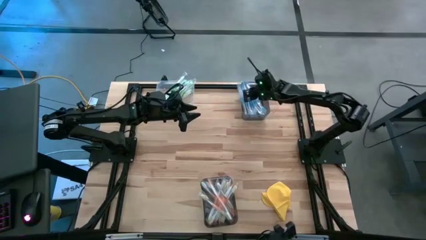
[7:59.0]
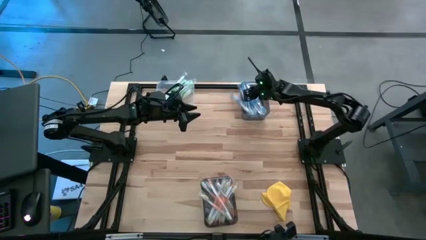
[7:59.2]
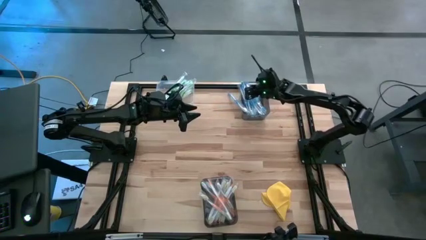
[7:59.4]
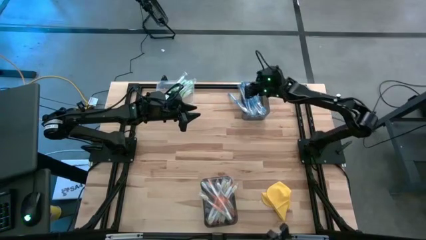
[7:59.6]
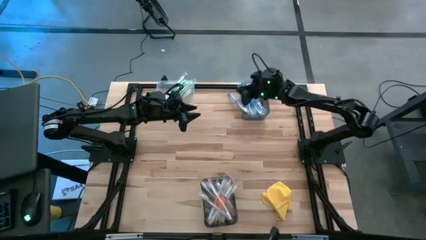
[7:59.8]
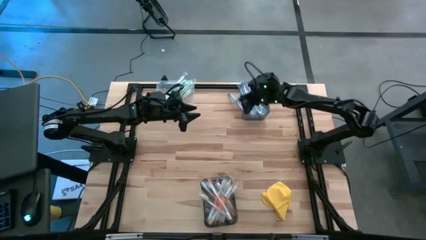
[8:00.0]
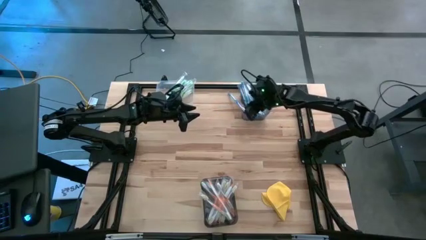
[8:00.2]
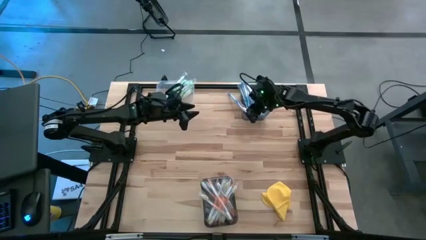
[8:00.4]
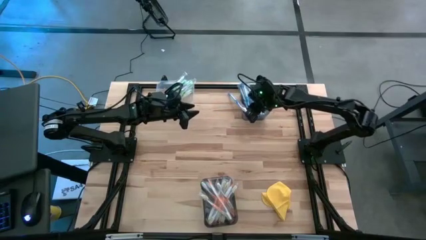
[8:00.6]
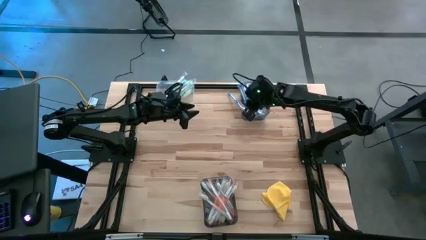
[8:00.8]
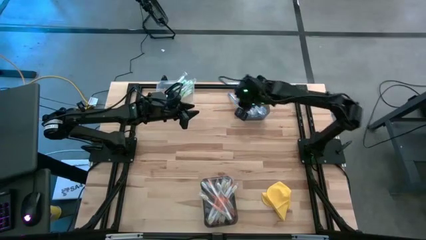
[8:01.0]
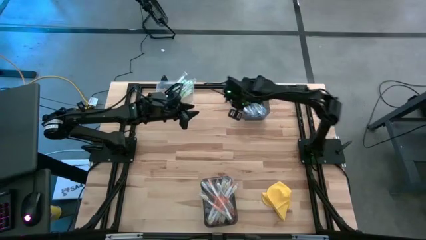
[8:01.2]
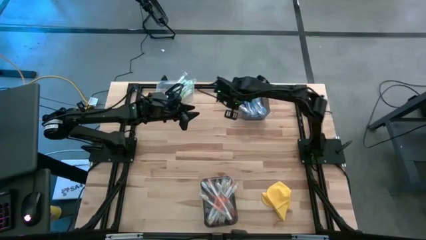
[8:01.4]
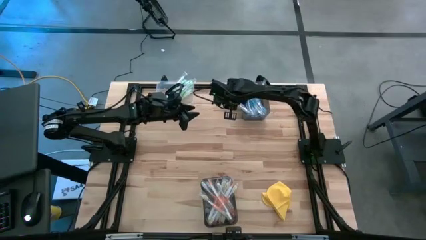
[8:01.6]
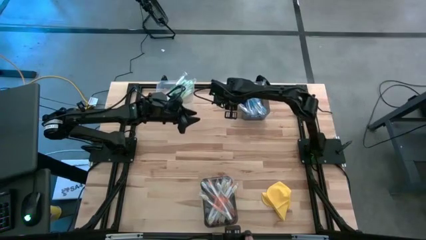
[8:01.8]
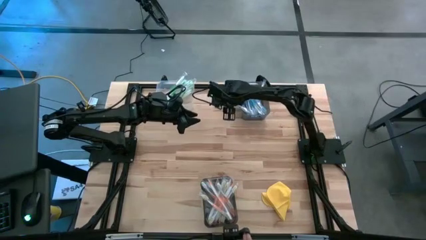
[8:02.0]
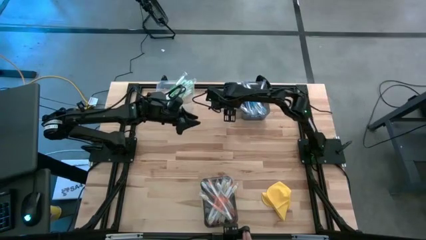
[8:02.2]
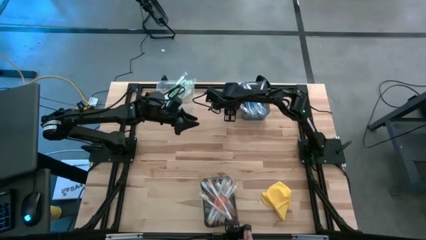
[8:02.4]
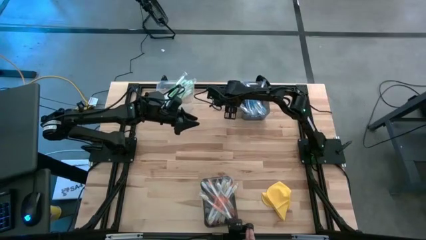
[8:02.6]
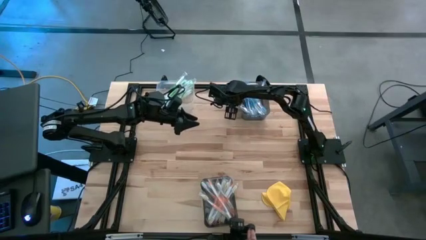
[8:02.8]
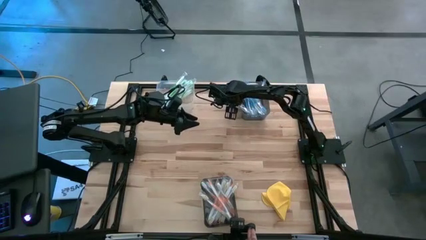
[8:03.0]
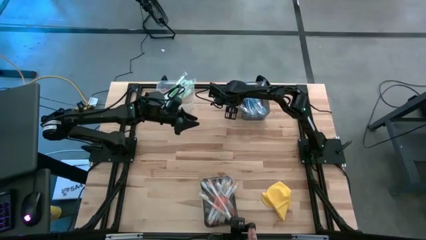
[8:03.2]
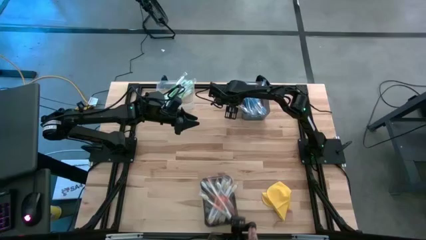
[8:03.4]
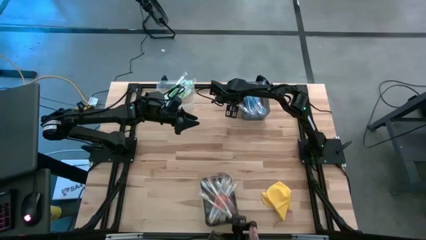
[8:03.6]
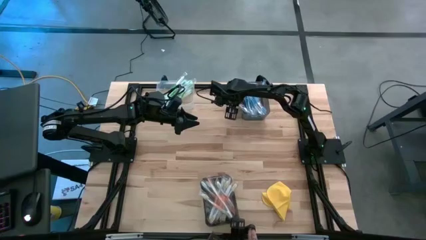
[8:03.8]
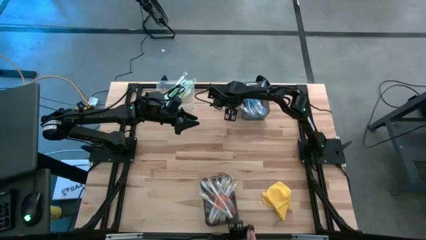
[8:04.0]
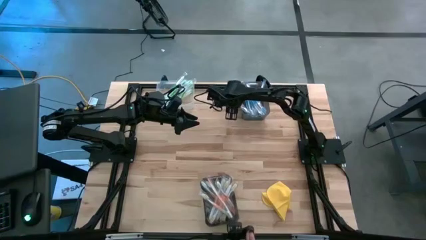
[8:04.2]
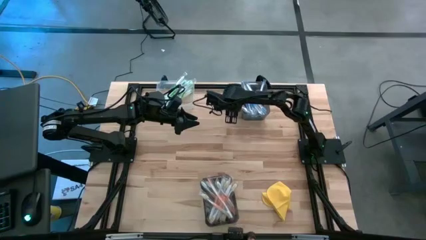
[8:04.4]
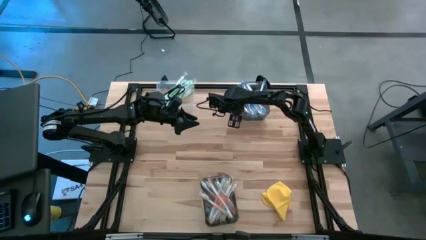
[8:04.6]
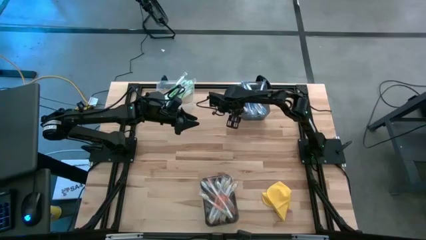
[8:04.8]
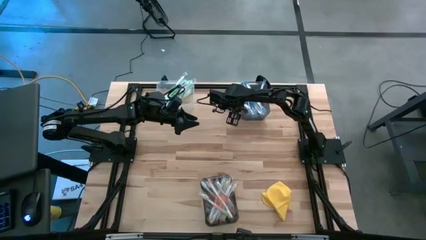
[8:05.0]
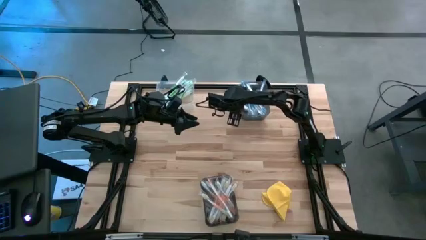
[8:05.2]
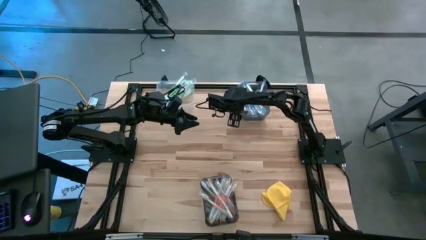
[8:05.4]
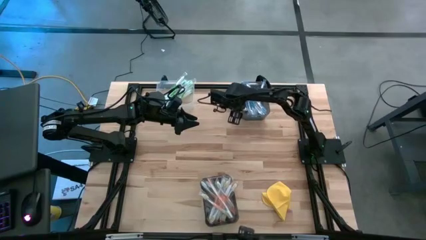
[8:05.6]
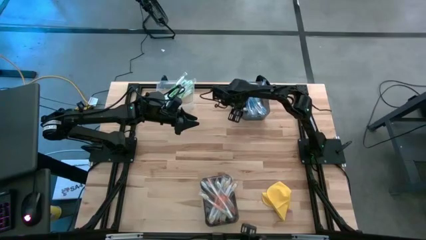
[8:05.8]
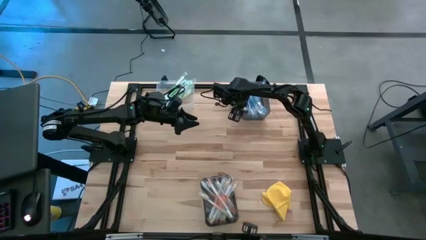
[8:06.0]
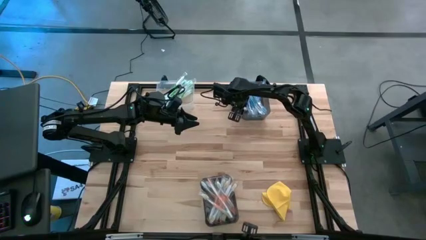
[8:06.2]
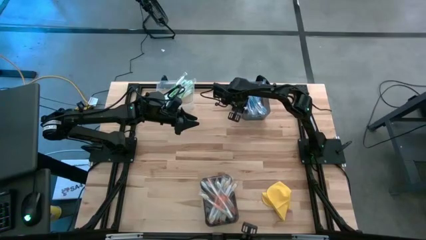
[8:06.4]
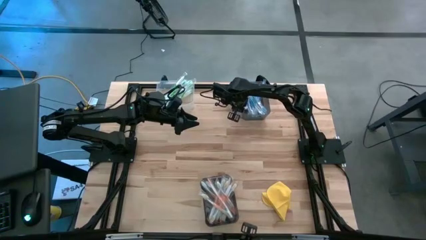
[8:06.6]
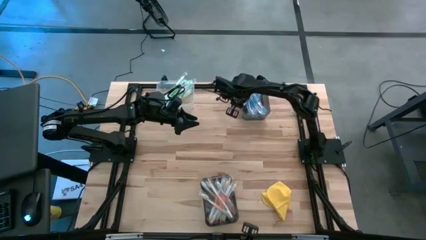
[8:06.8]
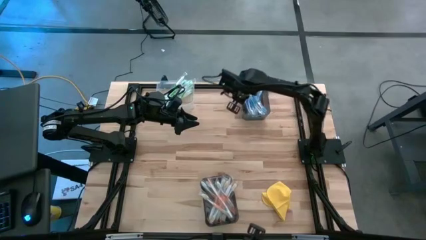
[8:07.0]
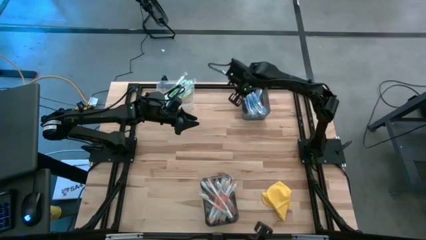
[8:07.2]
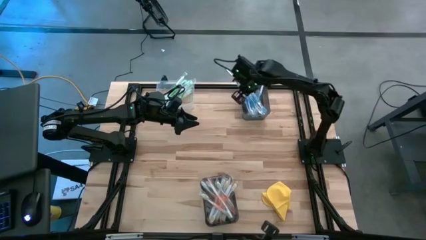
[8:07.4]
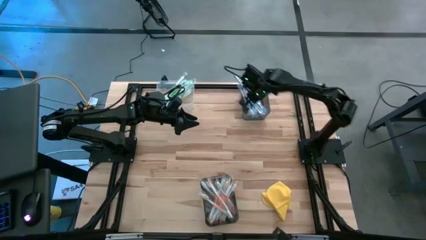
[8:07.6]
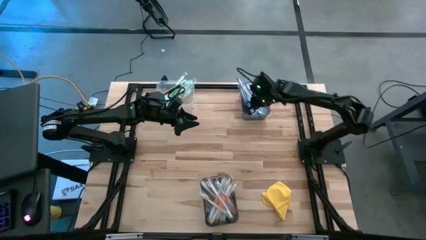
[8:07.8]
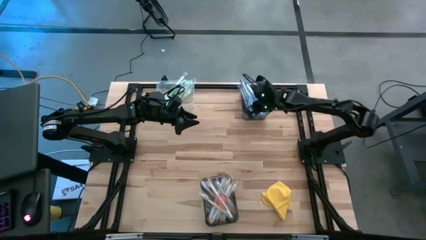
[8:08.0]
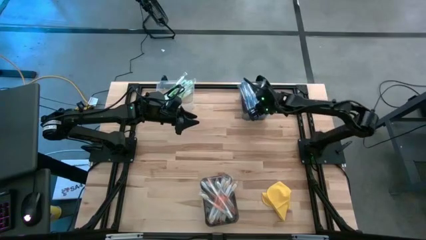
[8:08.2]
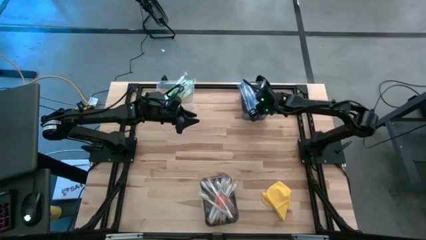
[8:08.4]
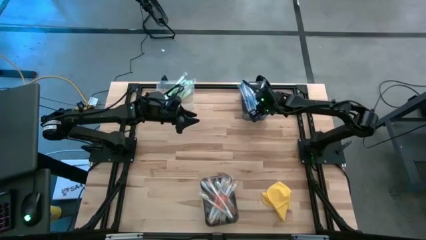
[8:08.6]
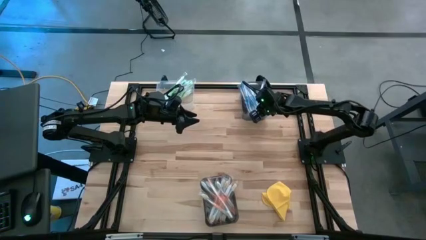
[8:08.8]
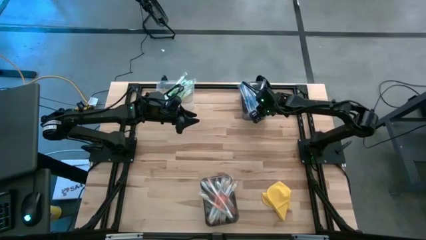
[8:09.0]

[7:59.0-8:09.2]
Task: Pick & Place Toothbrushes
Put the blue toothbrush into the top black bin

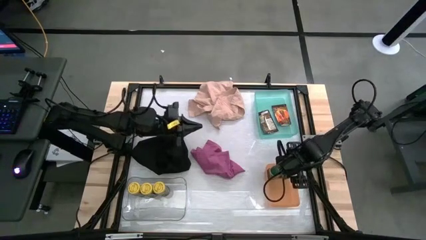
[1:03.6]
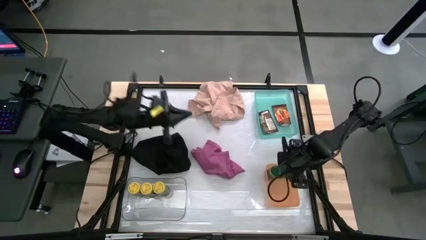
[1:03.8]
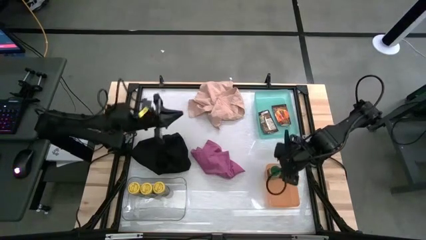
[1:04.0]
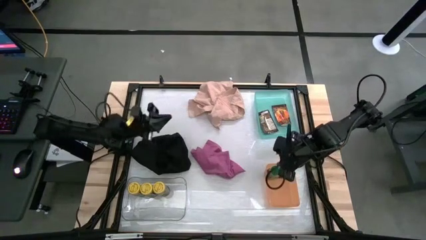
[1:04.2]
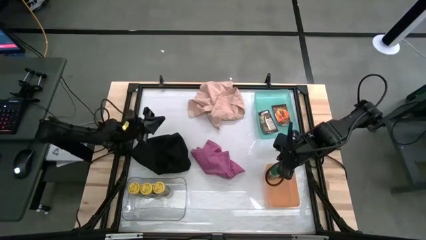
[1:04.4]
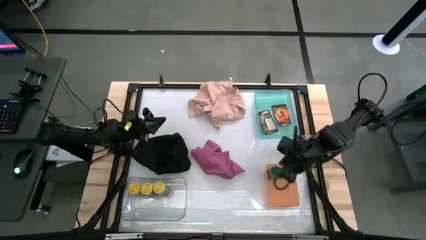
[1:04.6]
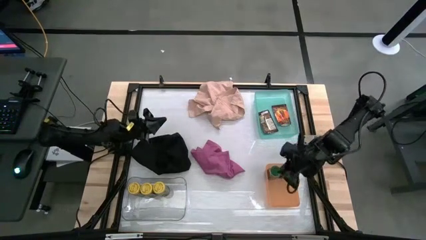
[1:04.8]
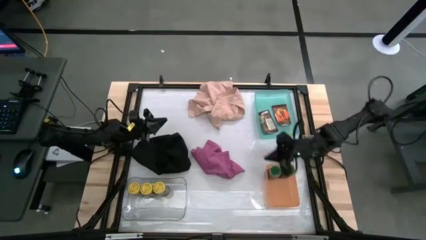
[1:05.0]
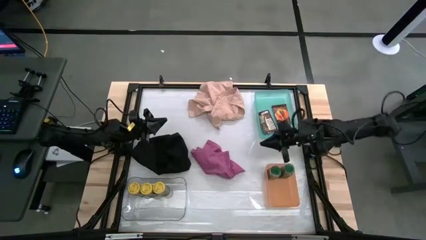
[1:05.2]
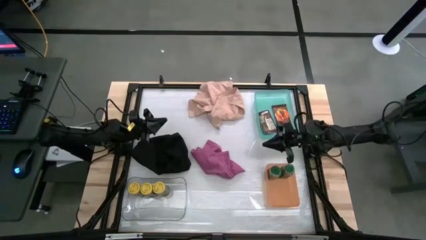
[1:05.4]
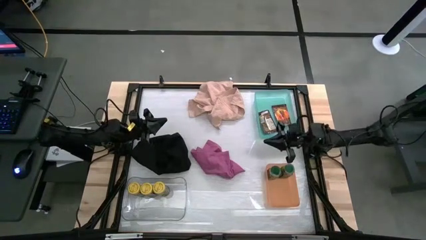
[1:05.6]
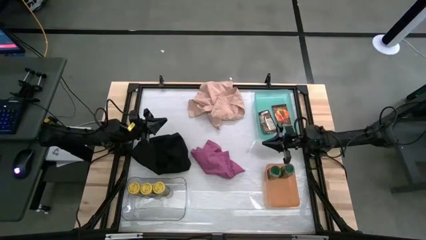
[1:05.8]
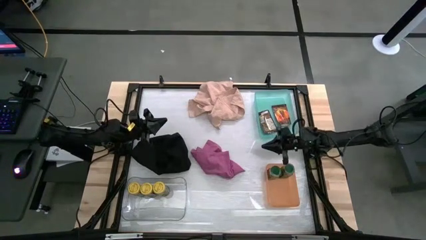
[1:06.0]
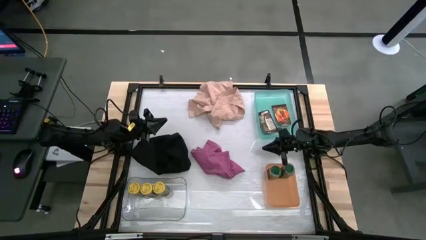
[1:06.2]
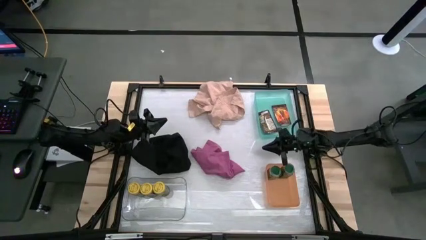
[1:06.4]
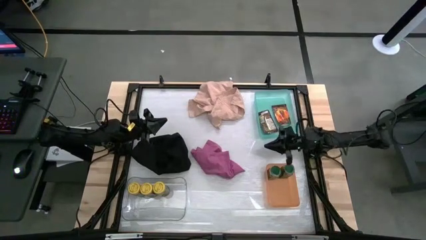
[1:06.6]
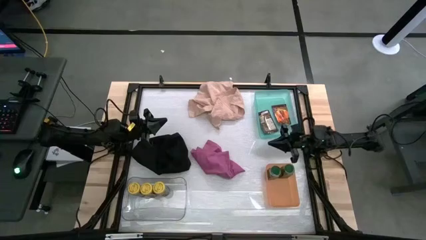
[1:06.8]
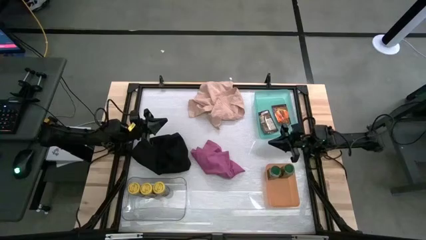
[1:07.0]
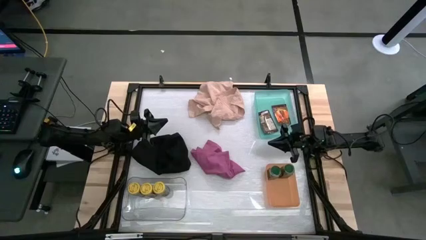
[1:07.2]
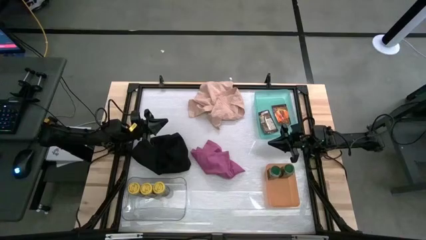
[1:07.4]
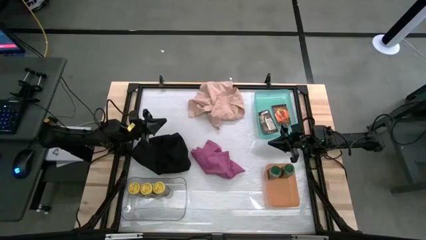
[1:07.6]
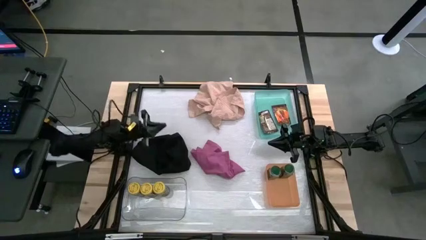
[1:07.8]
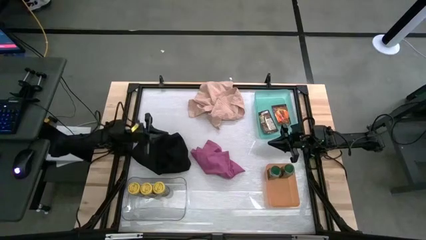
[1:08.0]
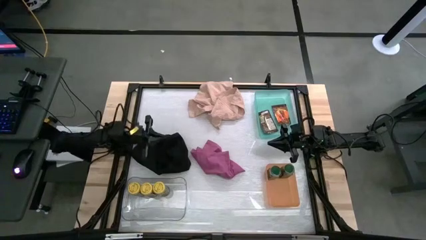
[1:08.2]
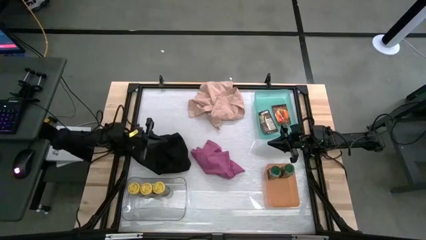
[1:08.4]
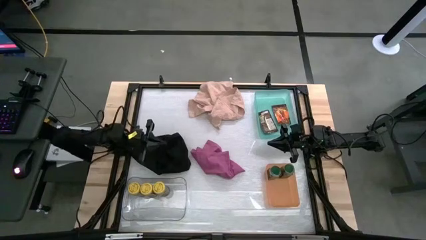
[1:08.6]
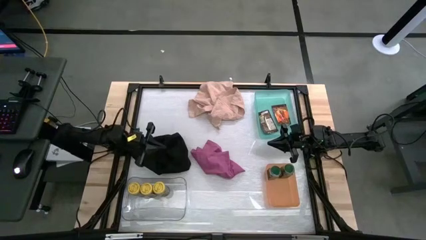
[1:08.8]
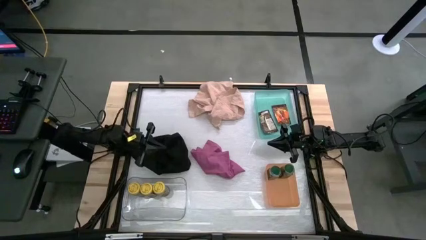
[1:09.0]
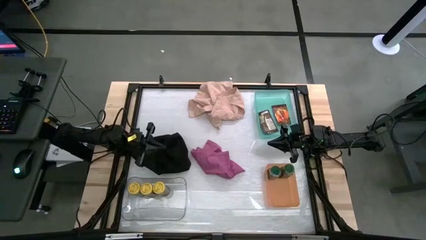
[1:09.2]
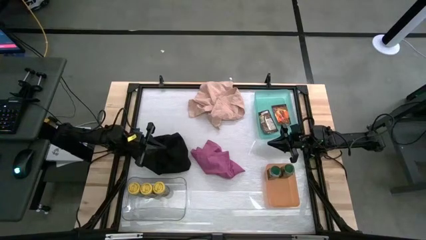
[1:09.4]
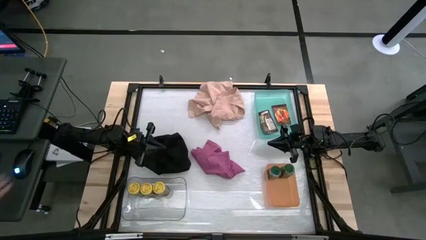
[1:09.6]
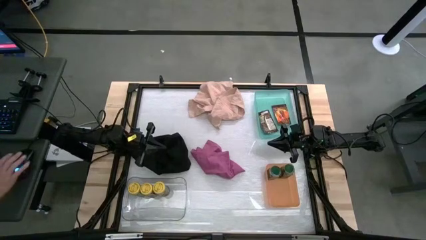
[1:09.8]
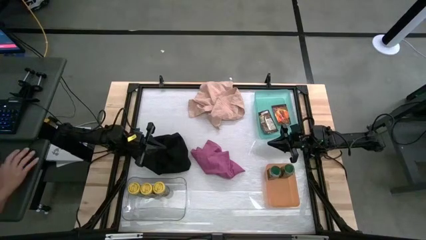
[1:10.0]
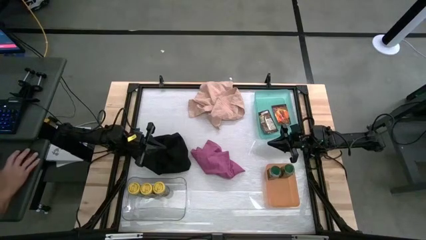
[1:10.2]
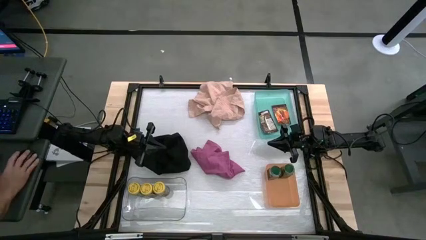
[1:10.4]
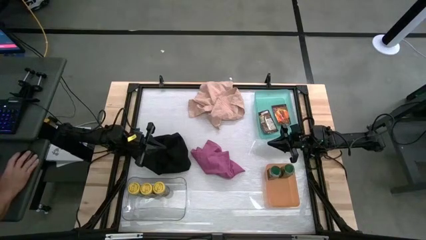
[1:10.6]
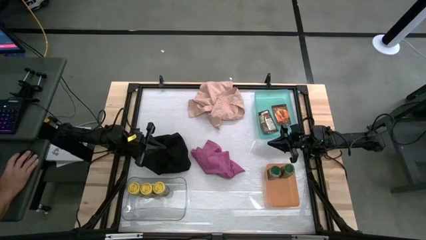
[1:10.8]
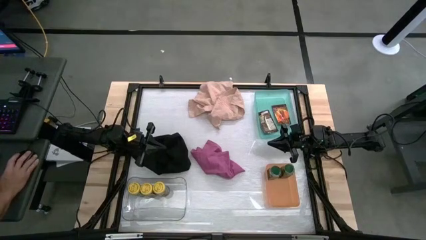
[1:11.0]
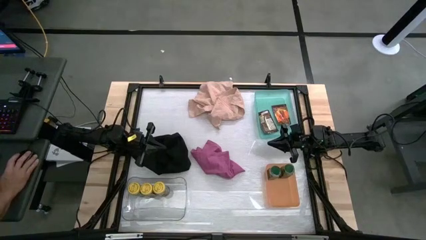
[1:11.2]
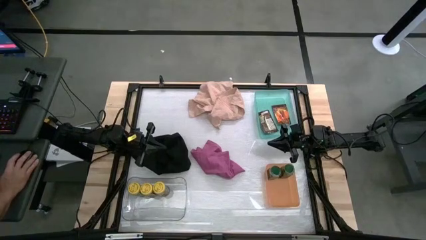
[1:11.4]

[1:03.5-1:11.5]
Task: Sort spices by type
Return to Home Position
